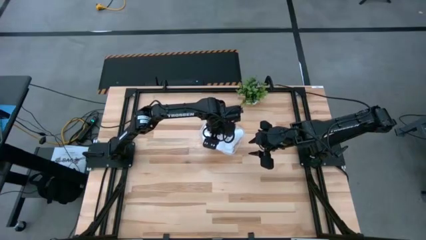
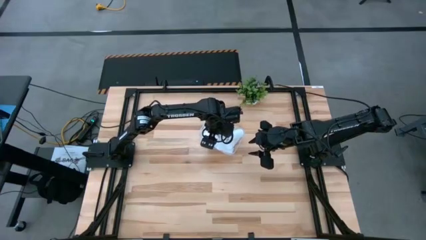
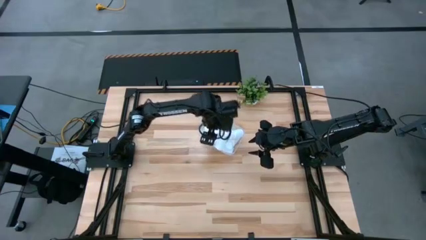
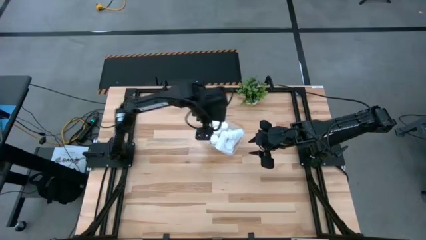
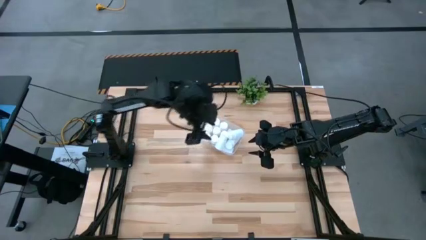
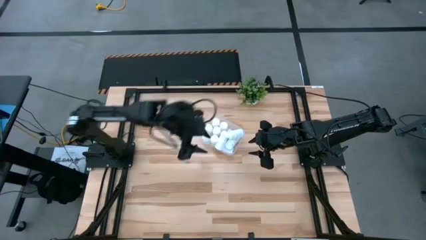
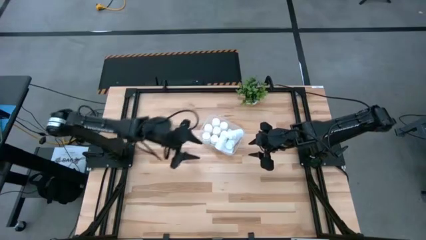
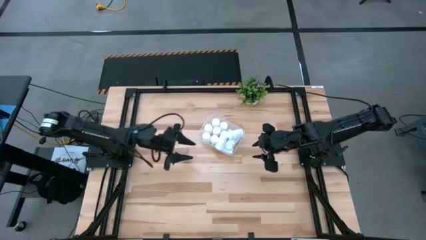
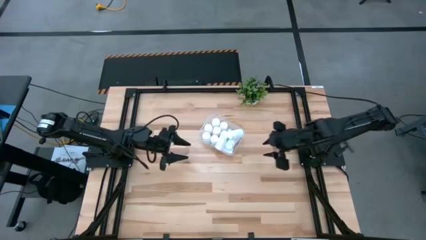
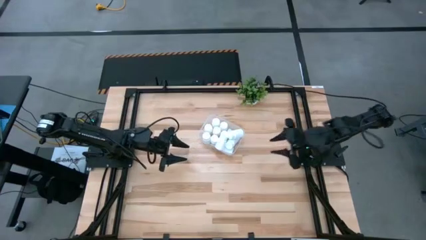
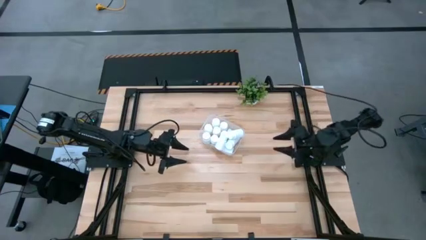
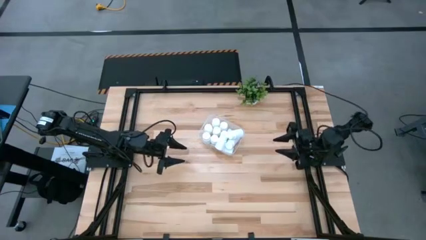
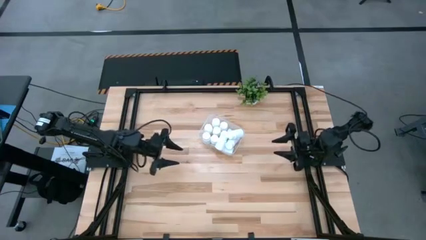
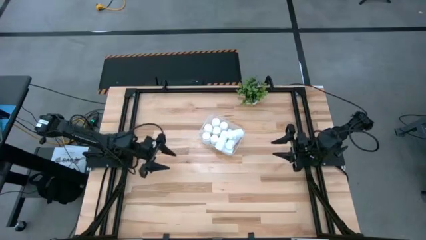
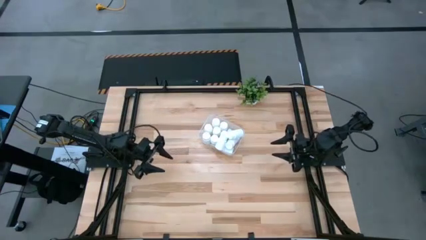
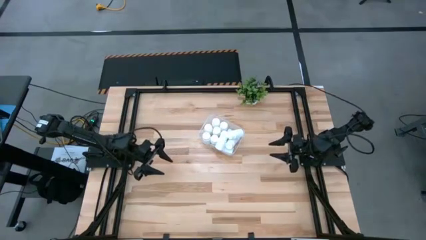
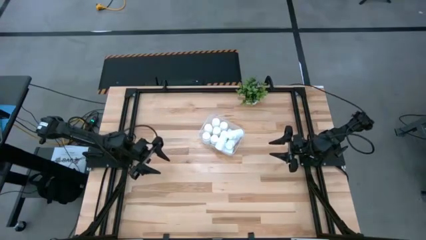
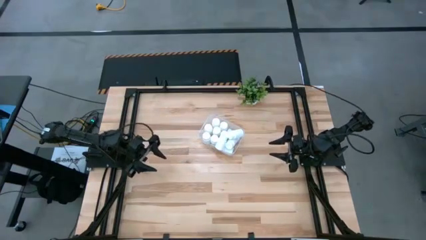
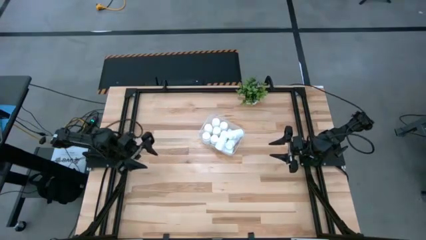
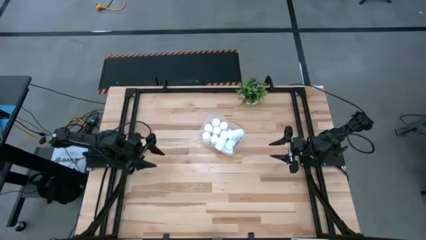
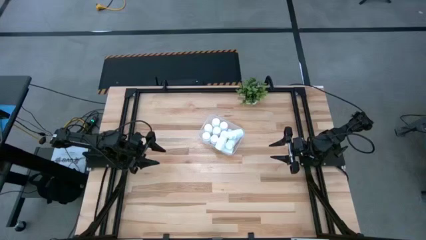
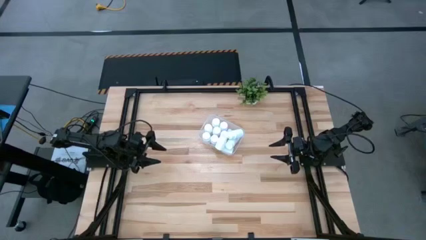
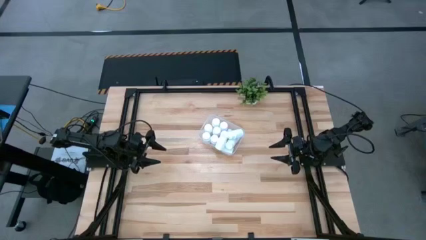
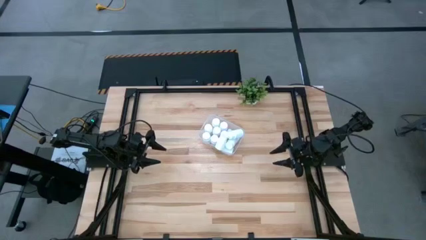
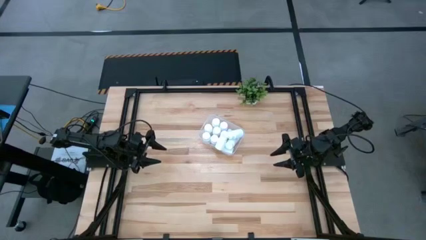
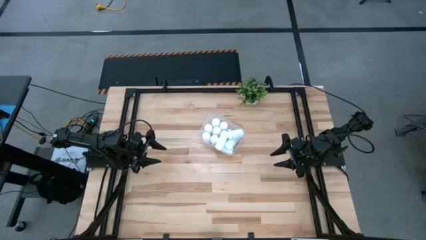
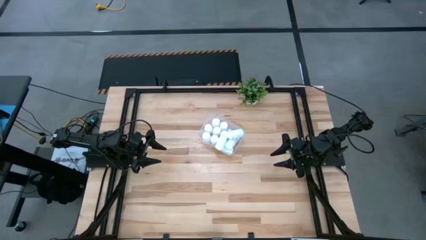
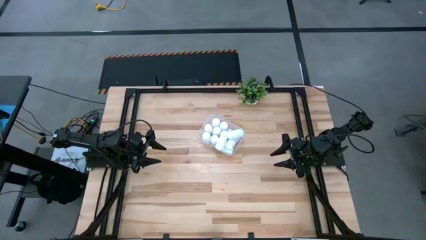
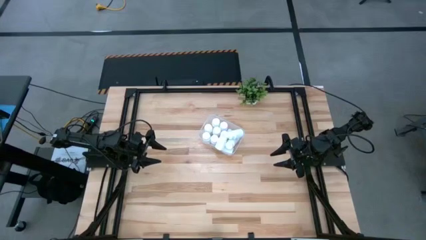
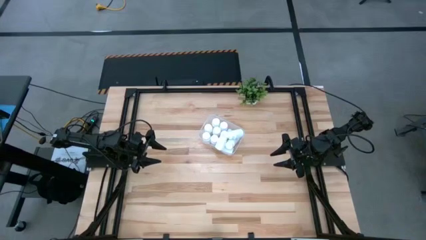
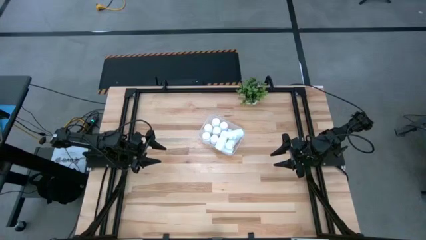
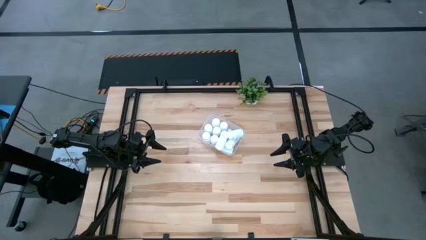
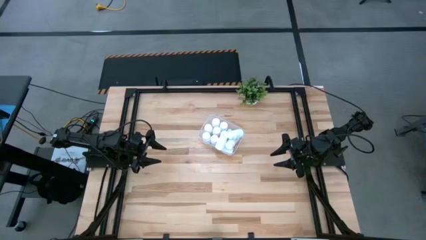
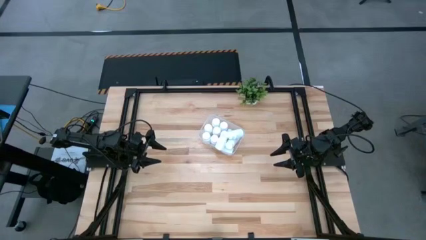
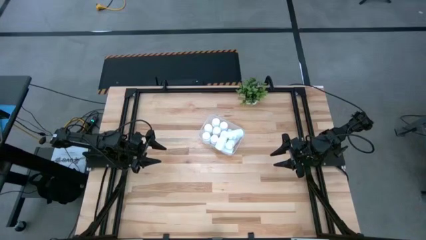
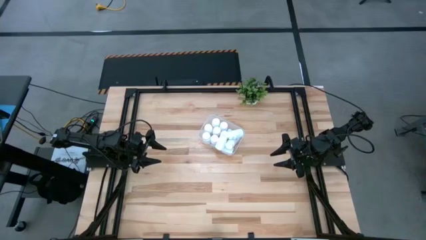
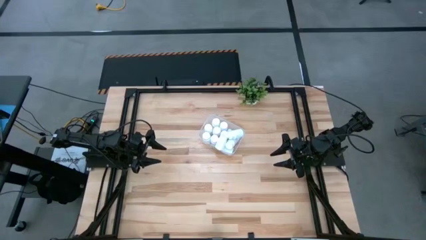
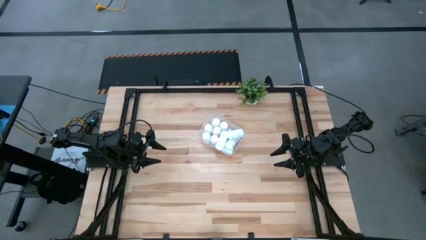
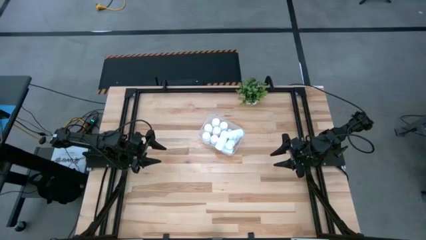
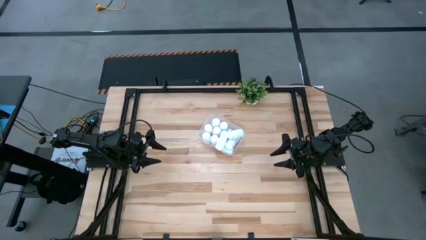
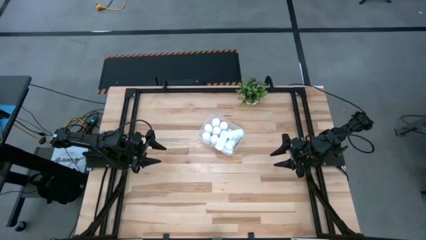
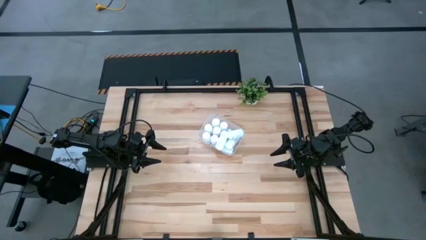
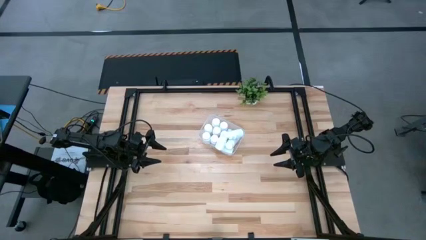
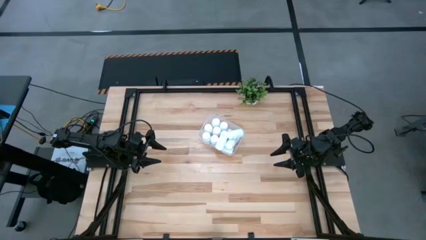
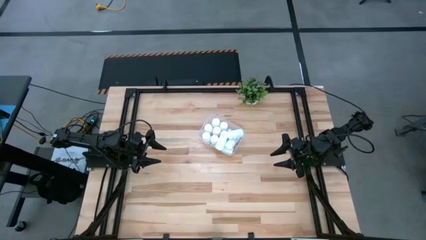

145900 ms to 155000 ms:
Task: Pick and place pill bottles into a basket
Return to Home Position

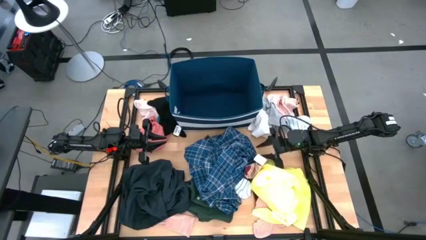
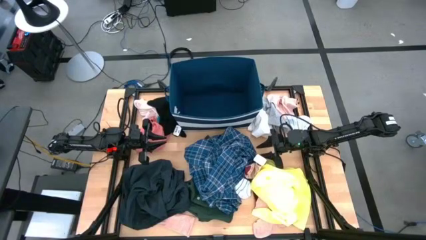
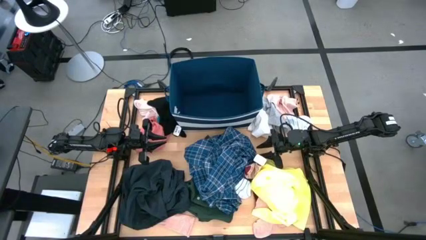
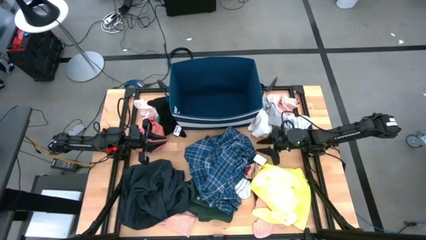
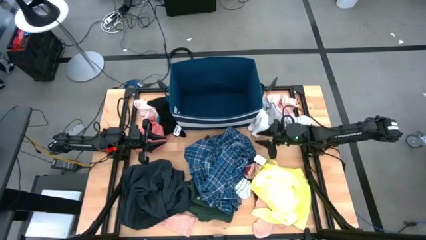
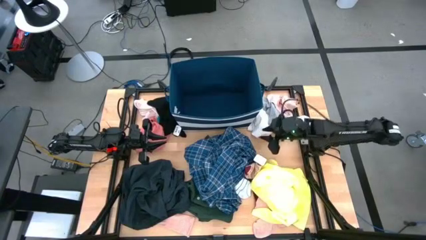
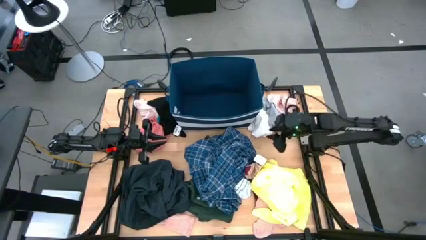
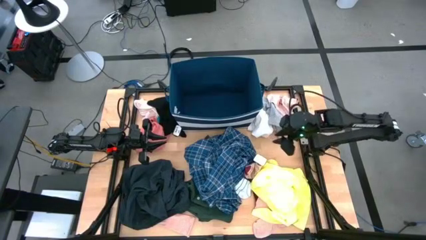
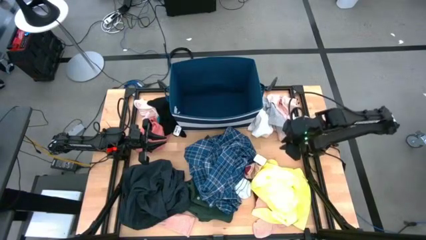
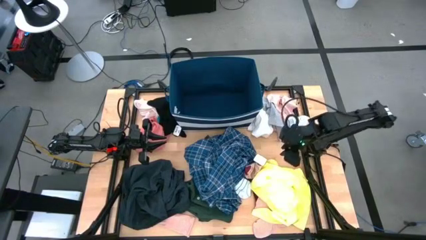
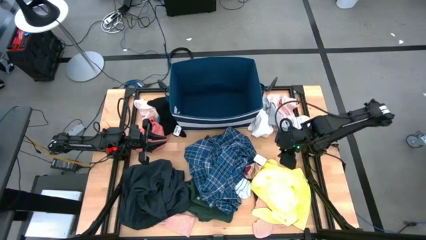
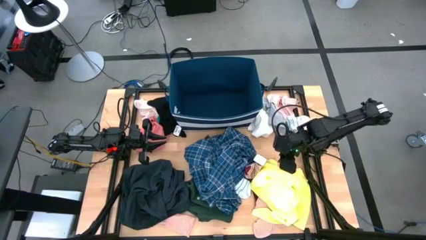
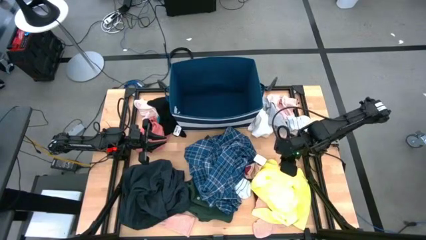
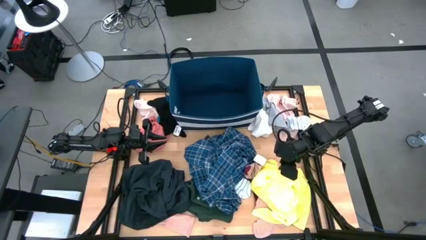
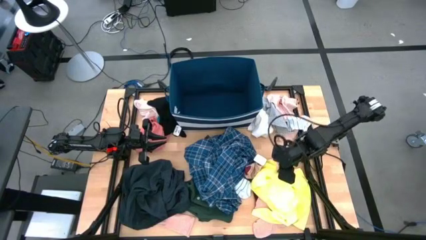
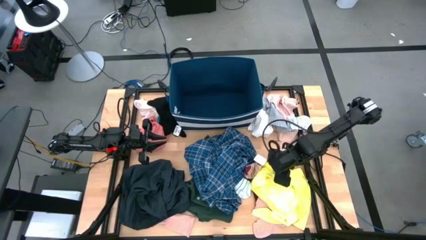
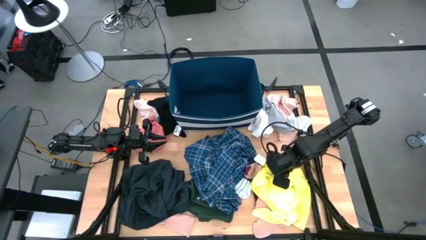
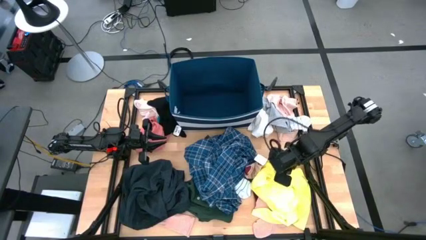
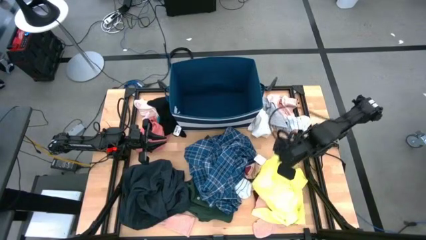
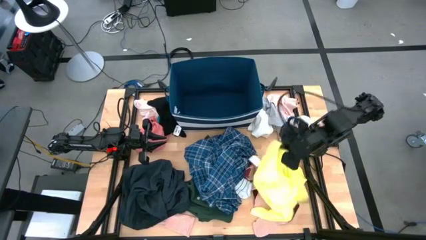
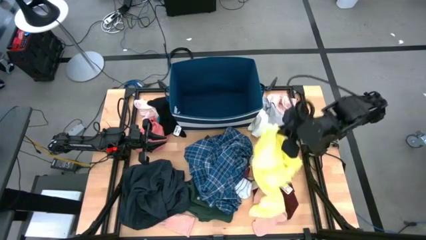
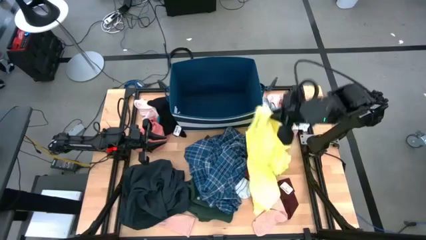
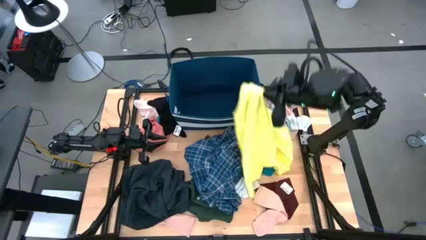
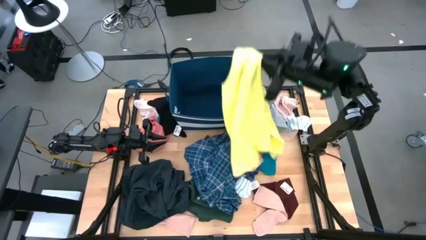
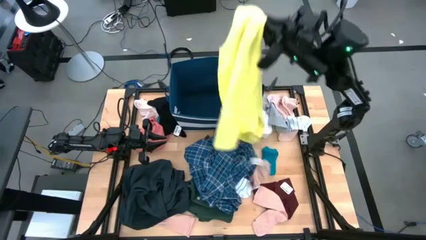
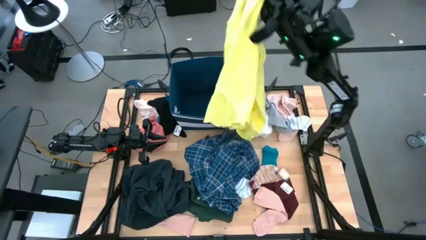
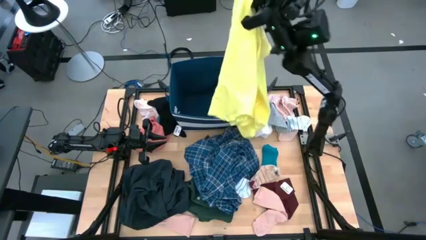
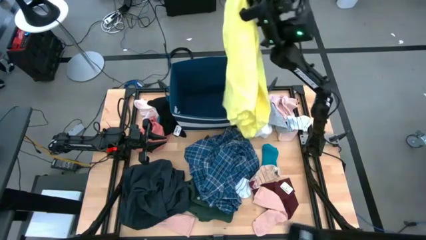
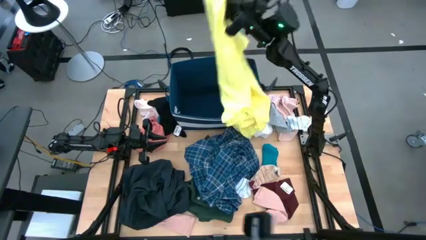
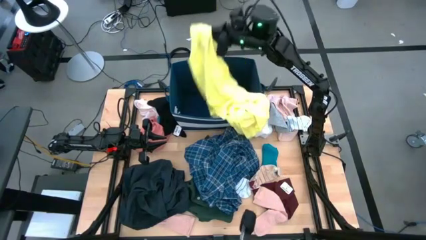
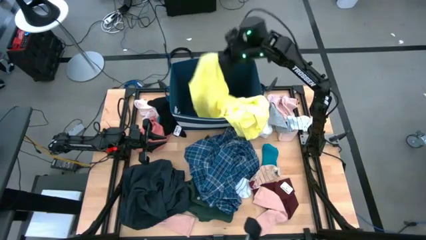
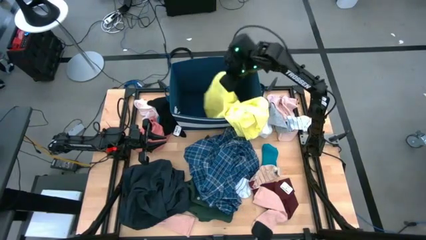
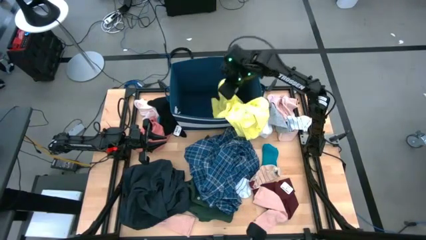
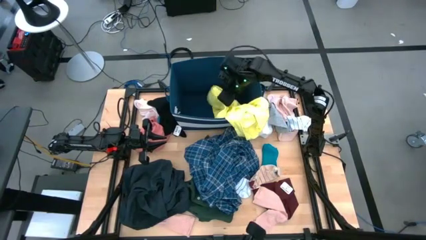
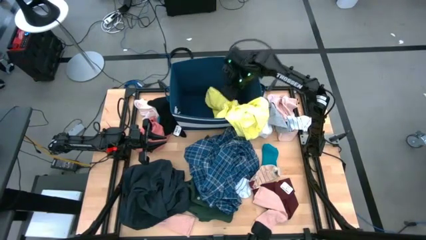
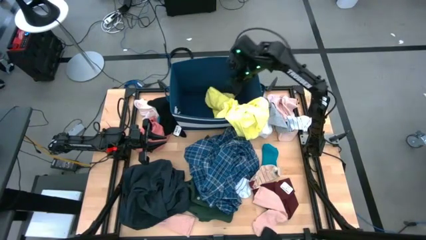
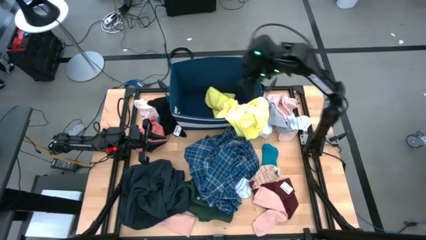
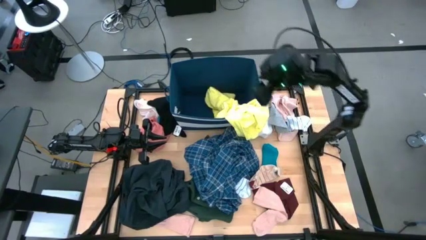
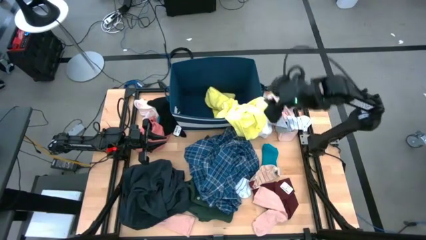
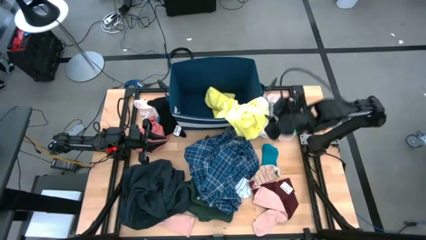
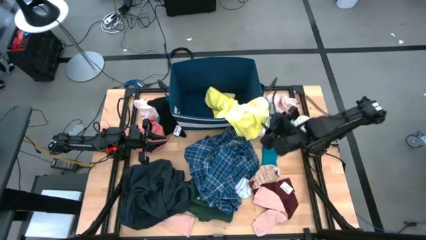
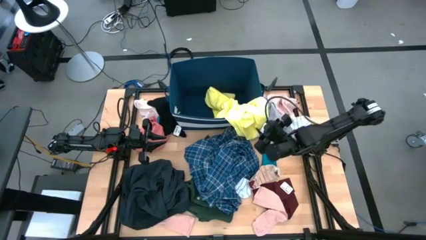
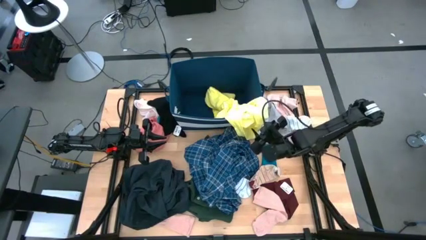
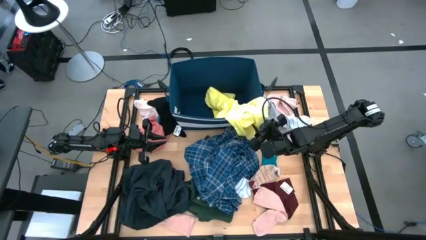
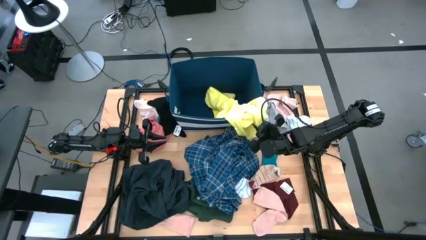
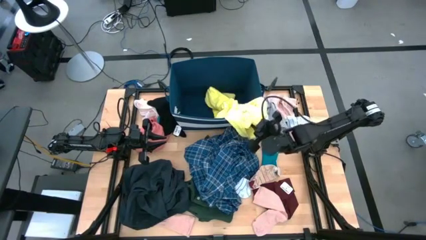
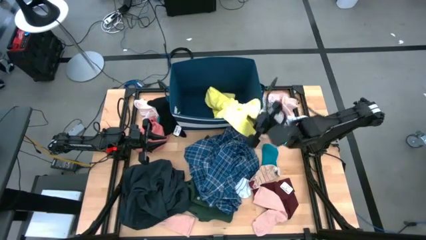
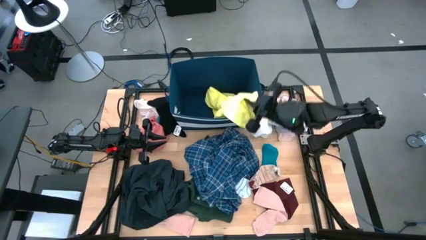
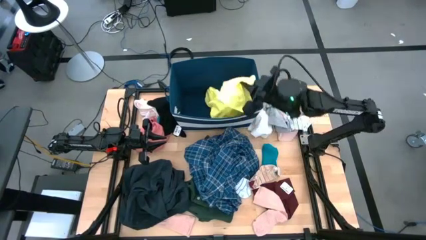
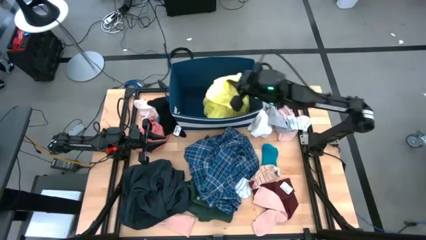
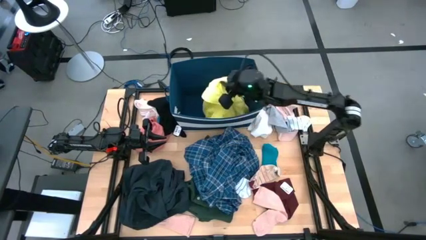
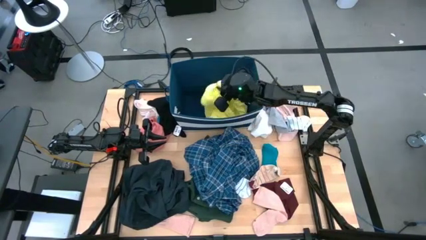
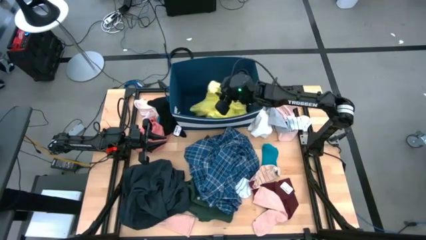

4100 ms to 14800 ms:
Task: Sort clothes
Put the yellow shirt into the blue laundry bin
